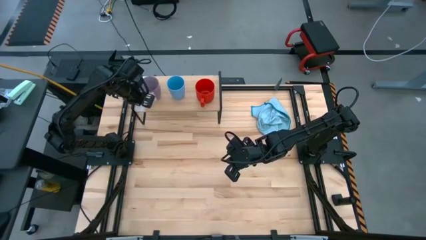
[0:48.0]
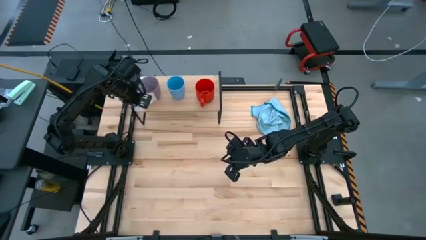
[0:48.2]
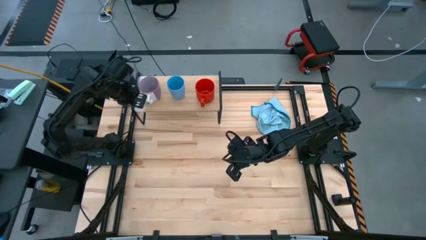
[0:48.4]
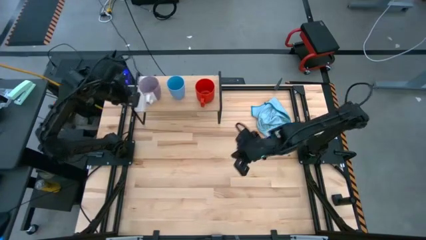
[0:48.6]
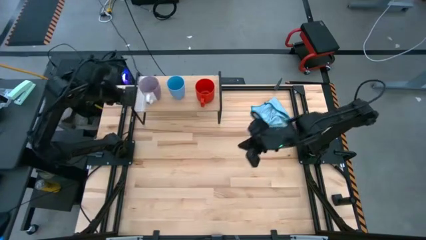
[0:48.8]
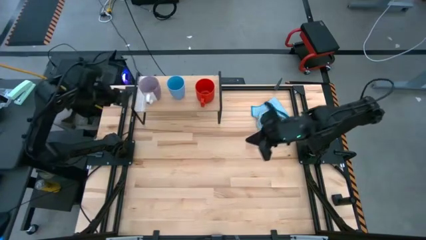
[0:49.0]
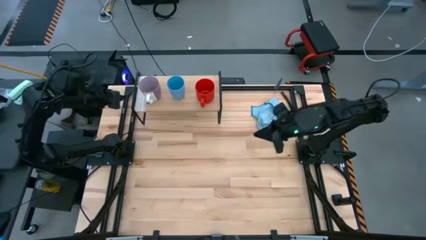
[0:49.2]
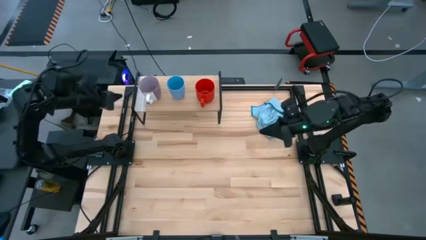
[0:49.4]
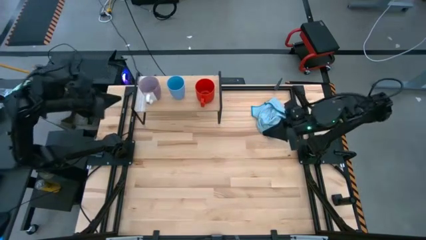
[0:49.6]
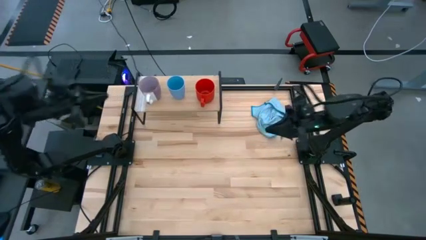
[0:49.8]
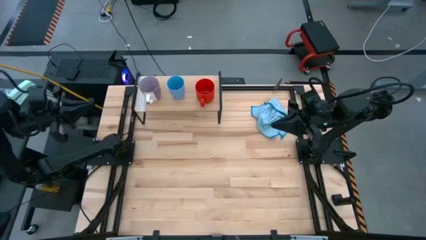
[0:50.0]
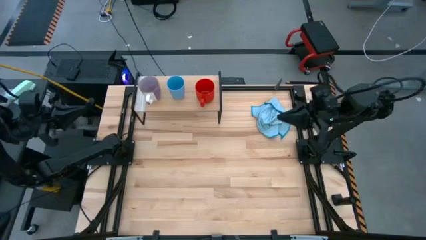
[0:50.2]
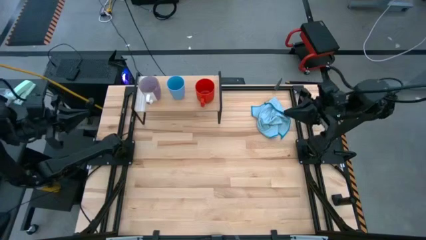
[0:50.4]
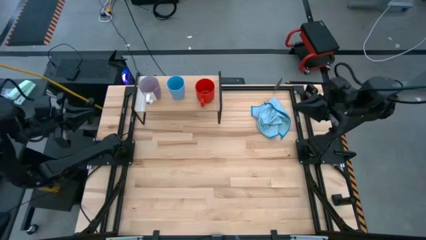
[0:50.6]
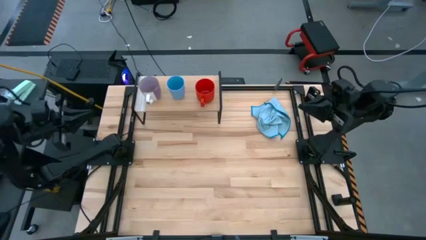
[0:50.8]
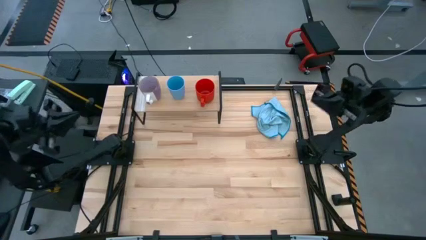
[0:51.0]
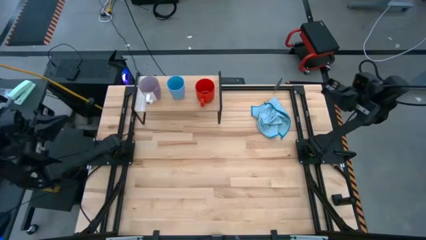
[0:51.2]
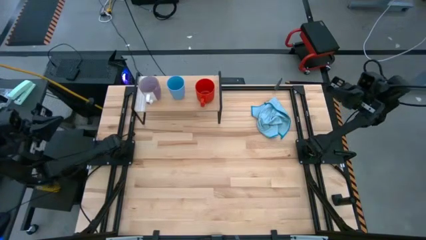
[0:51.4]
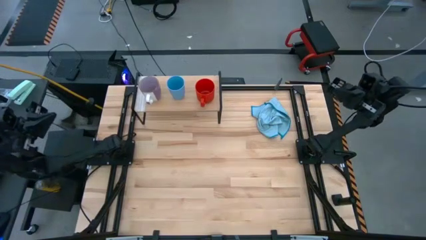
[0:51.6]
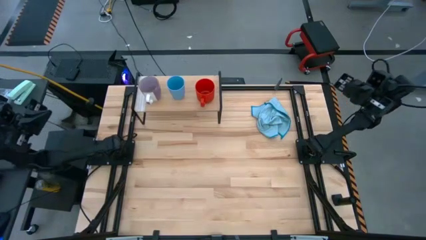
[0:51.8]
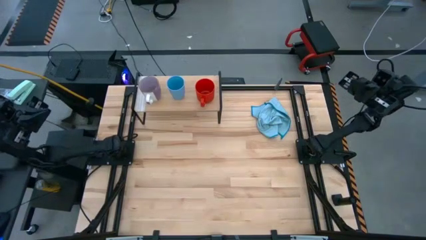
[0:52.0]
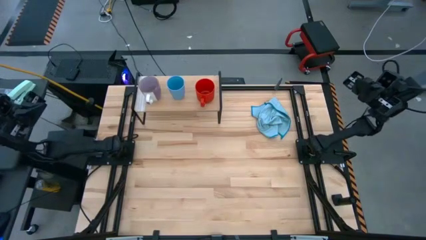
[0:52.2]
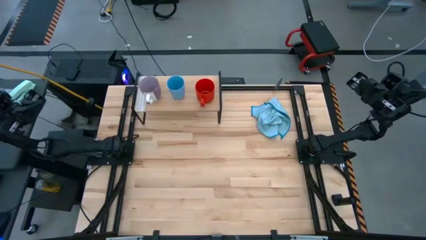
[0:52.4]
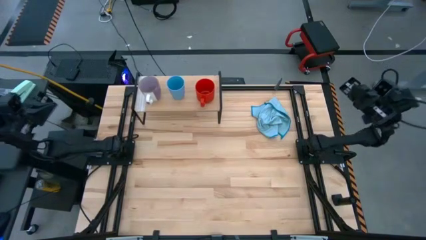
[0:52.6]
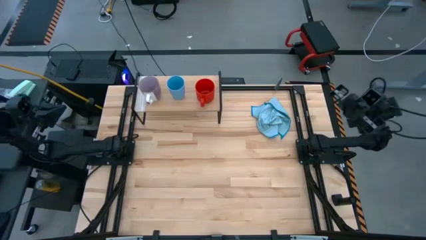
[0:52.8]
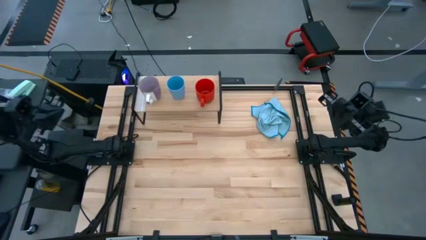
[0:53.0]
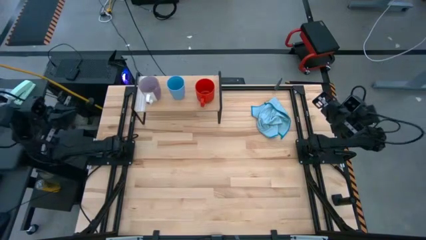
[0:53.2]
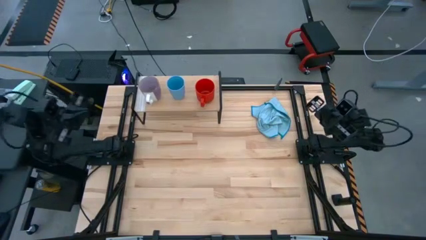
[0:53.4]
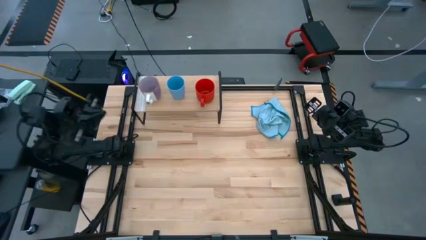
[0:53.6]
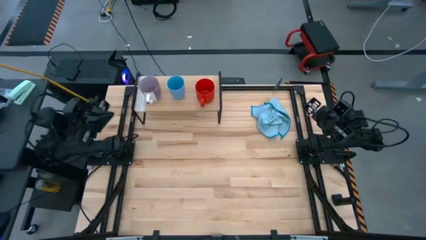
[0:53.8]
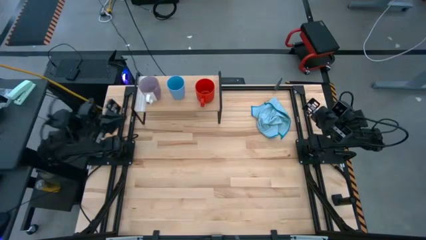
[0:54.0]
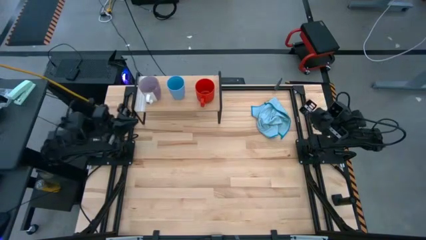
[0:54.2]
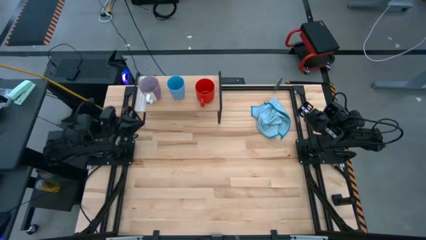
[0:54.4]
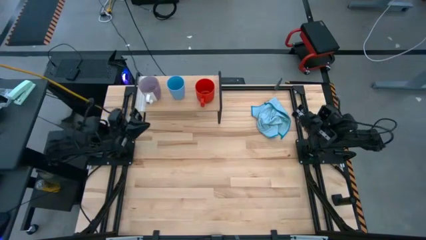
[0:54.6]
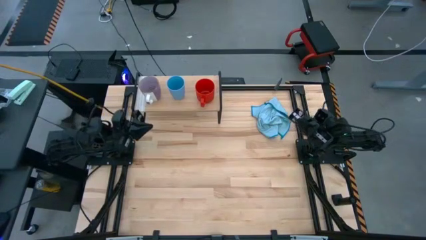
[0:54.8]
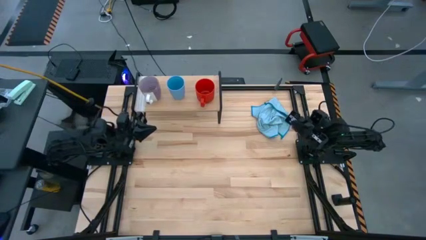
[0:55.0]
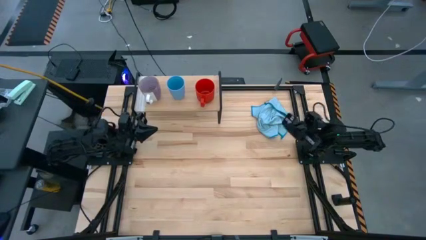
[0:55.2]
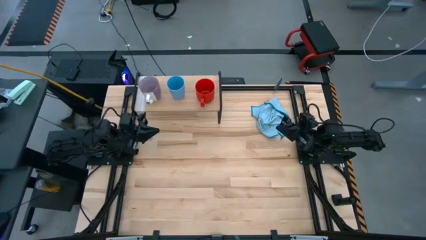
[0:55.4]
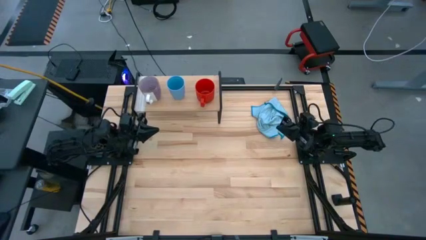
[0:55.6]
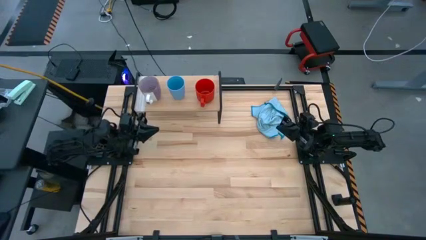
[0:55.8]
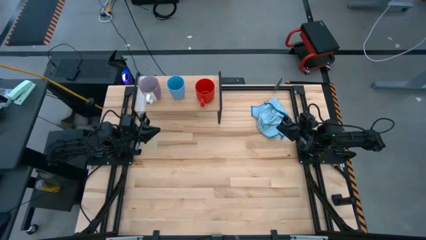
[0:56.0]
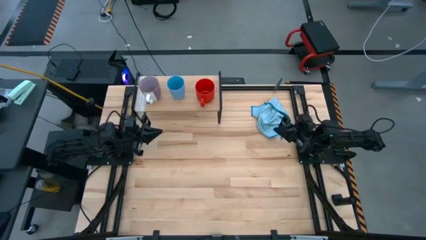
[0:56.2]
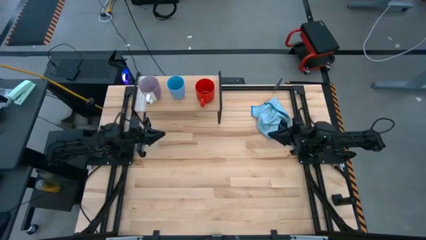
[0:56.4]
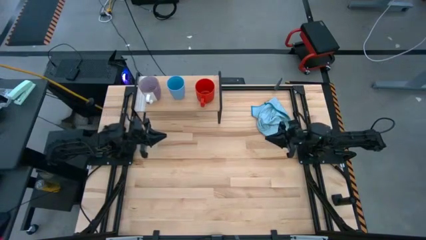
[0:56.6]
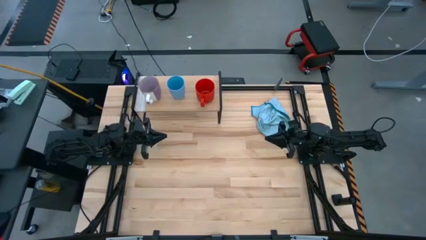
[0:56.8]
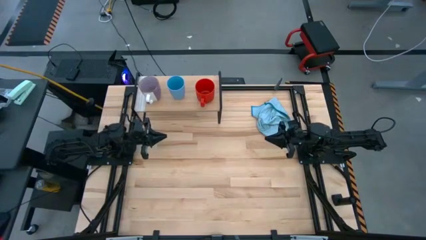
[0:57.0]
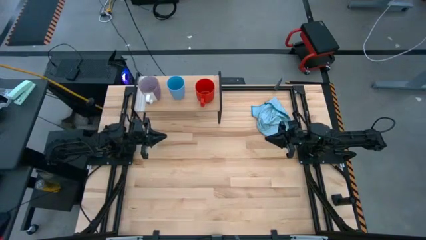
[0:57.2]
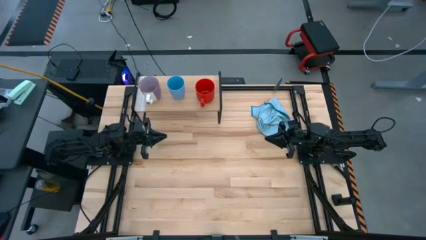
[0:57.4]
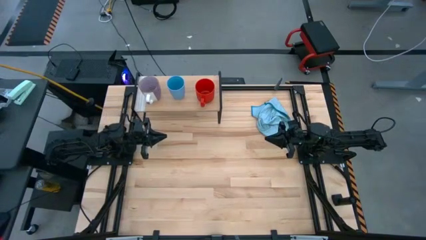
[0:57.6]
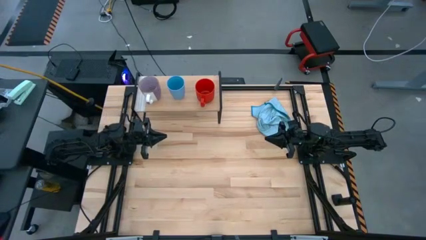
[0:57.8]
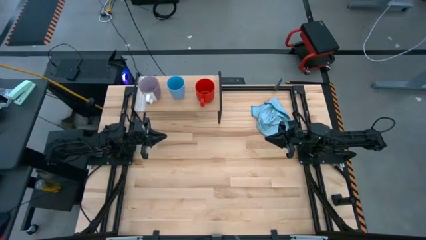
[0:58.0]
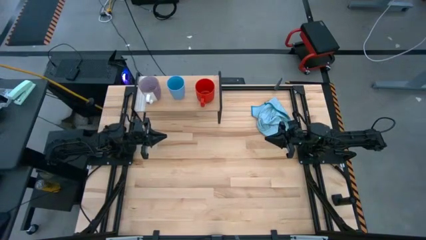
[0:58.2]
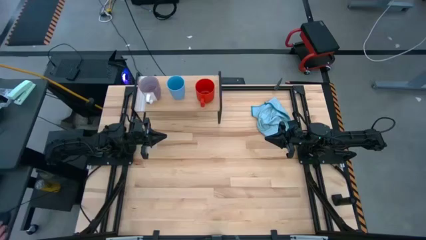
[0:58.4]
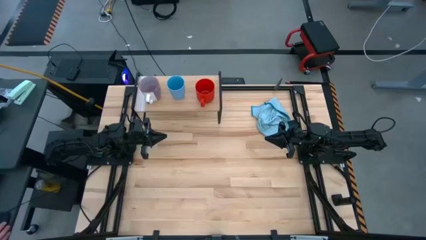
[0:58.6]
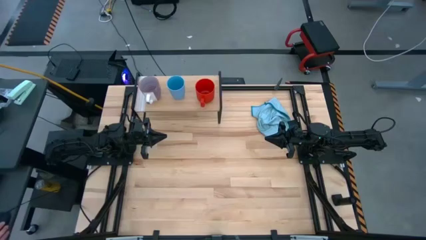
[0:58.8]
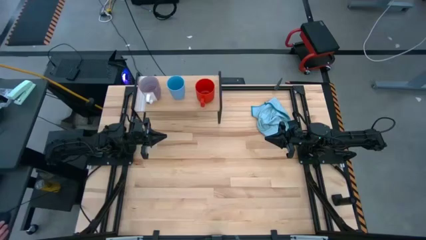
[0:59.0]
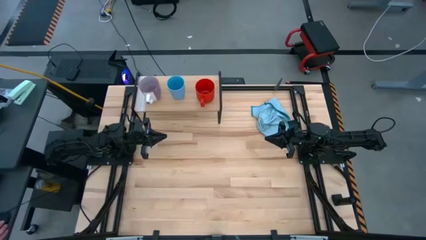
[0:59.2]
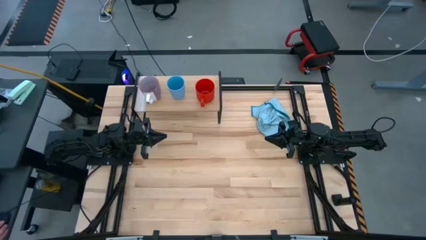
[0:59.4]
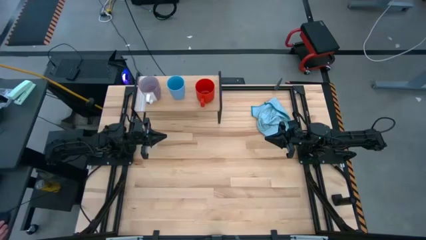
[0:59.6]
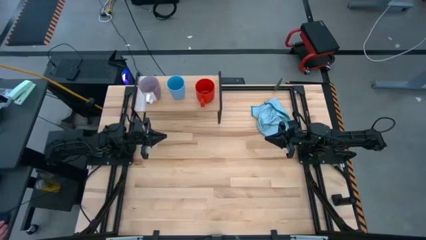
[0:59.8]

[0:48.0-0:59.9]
Task: Stack small to large cups/mugs on shelf
Return to Home Position
